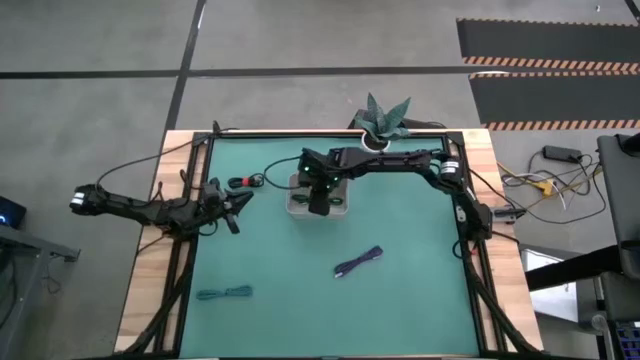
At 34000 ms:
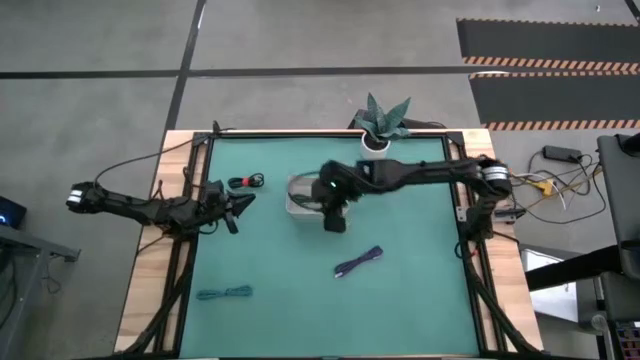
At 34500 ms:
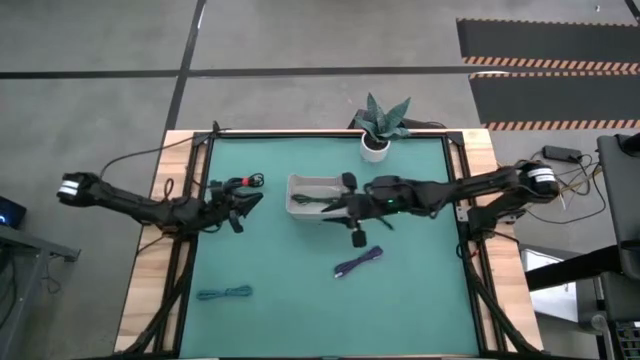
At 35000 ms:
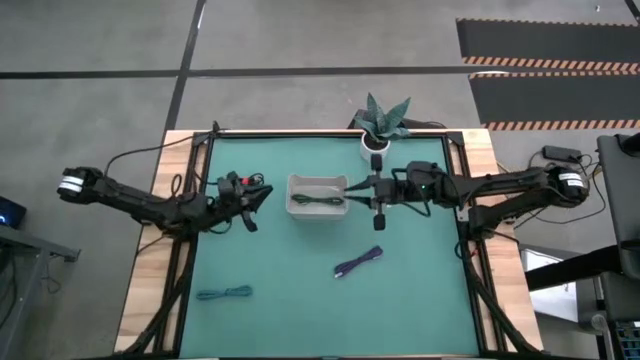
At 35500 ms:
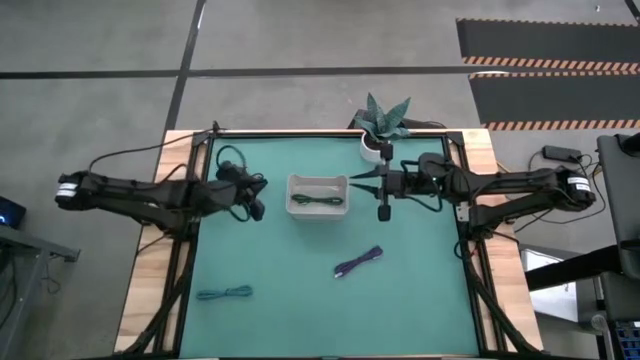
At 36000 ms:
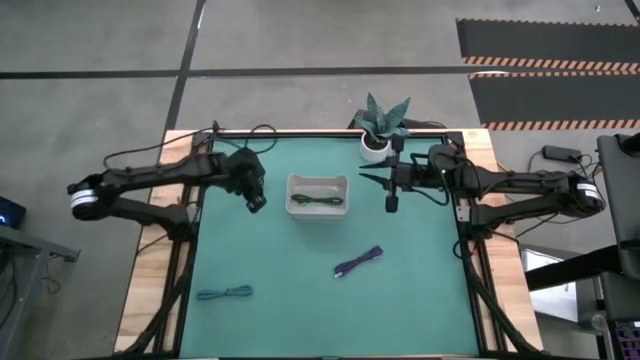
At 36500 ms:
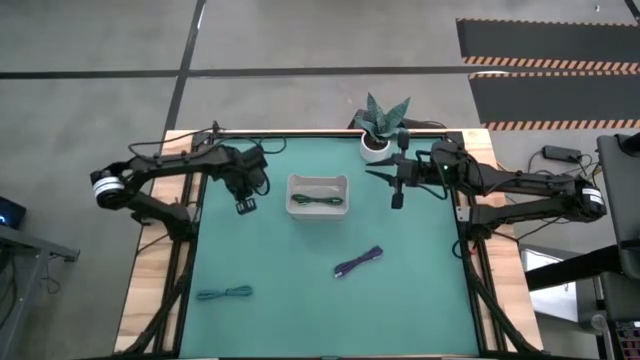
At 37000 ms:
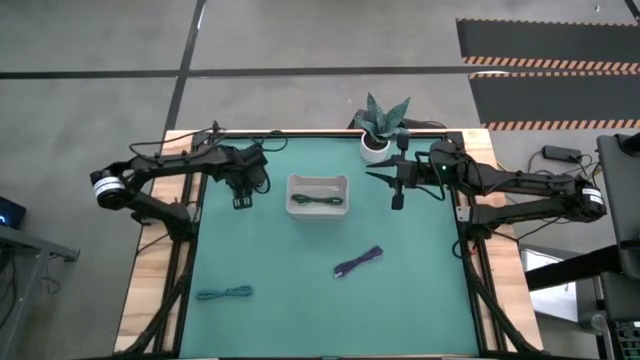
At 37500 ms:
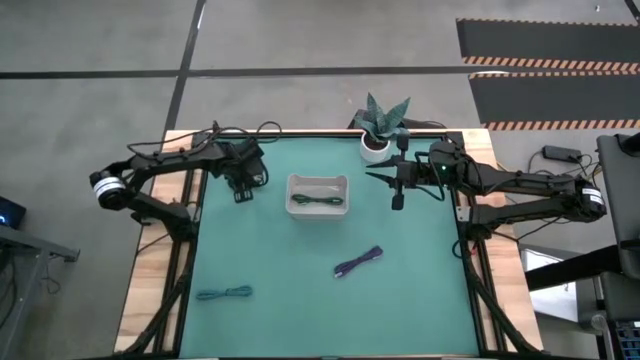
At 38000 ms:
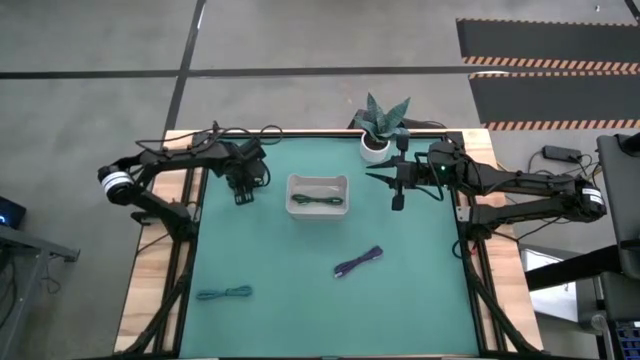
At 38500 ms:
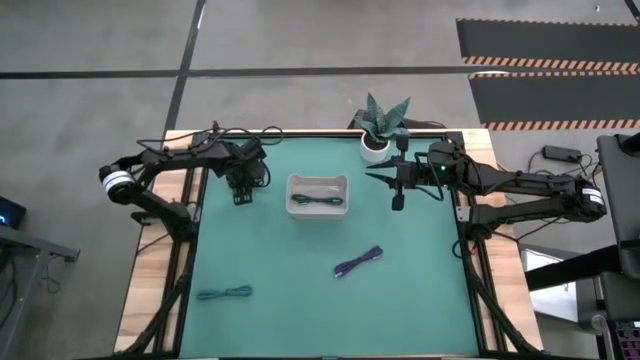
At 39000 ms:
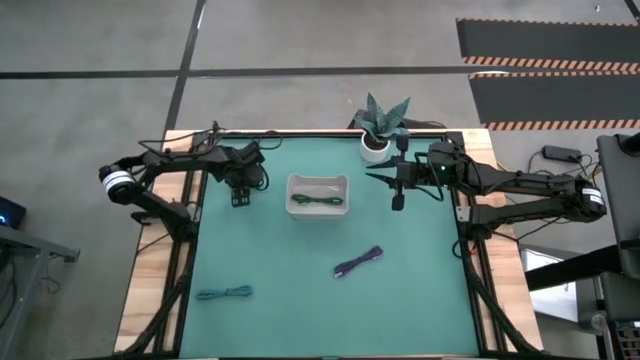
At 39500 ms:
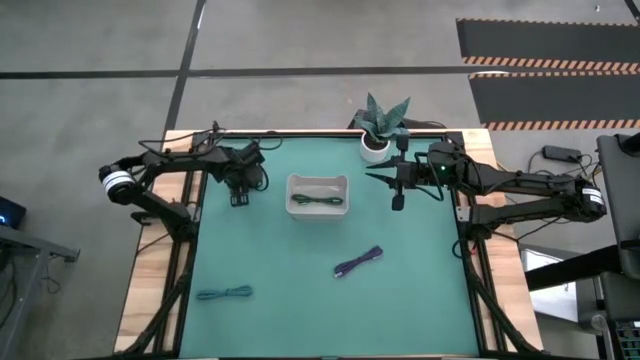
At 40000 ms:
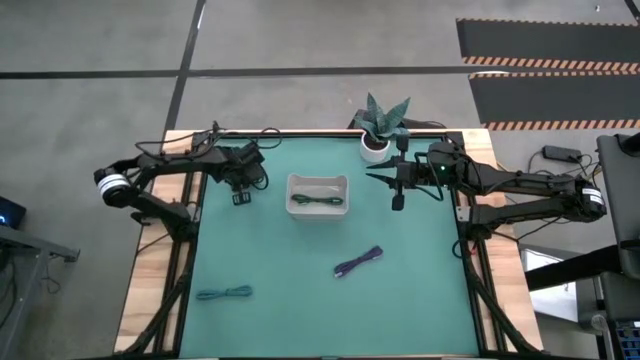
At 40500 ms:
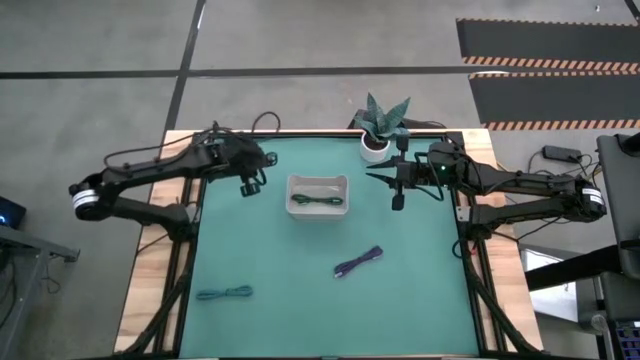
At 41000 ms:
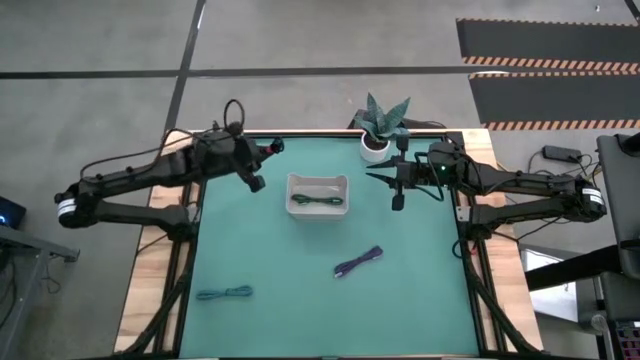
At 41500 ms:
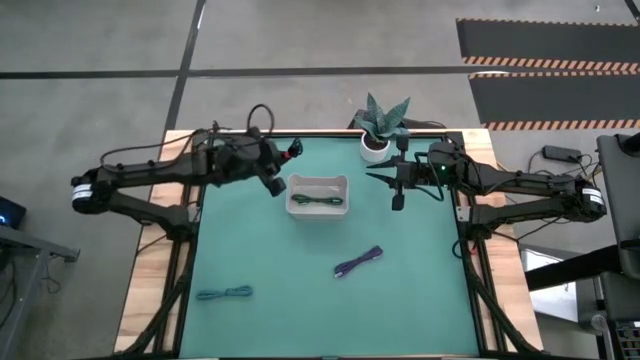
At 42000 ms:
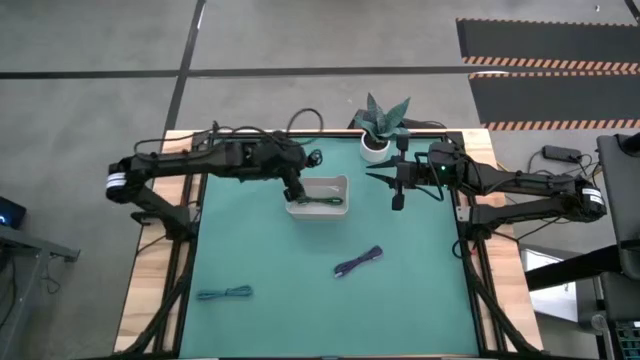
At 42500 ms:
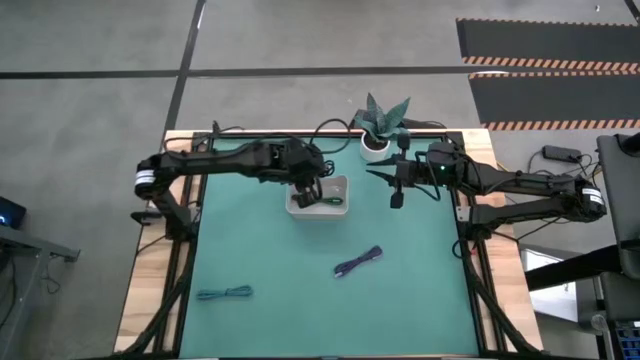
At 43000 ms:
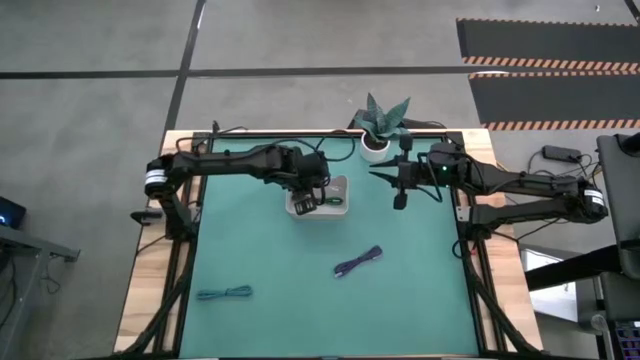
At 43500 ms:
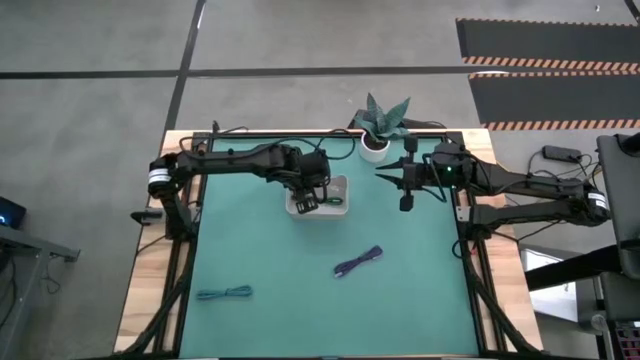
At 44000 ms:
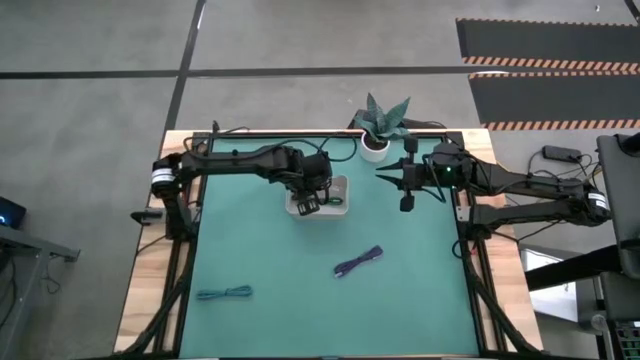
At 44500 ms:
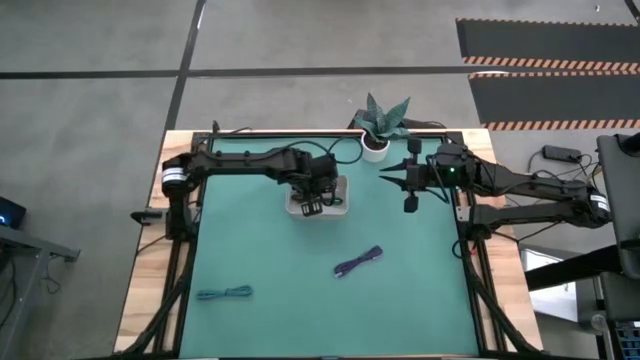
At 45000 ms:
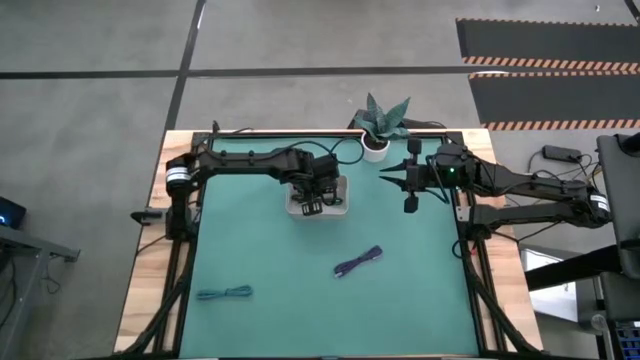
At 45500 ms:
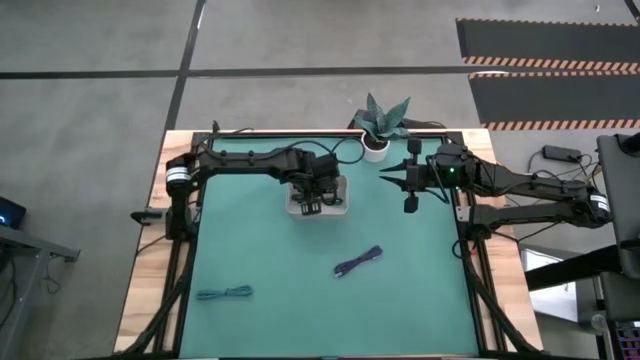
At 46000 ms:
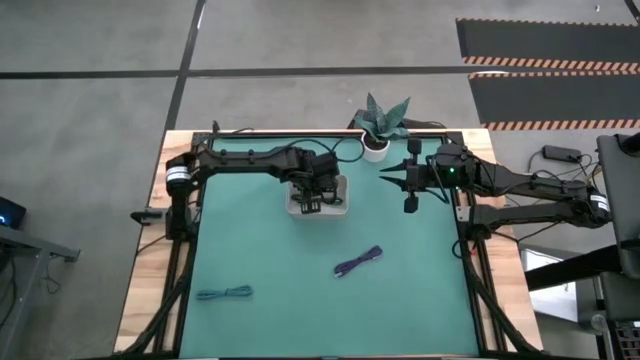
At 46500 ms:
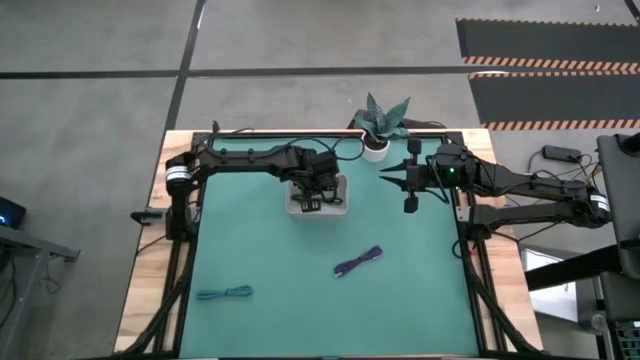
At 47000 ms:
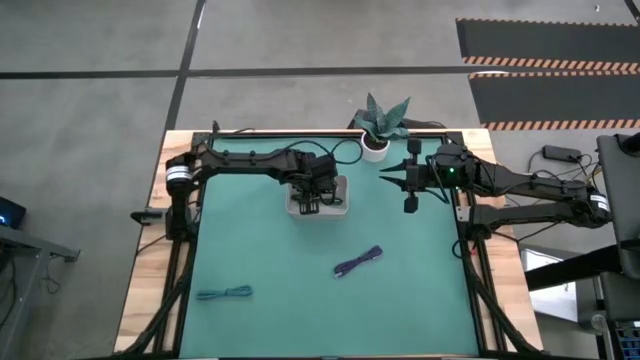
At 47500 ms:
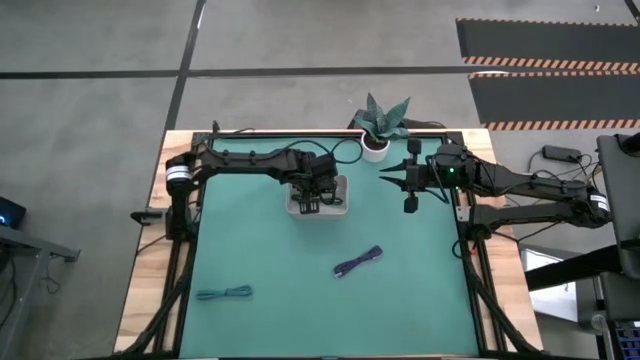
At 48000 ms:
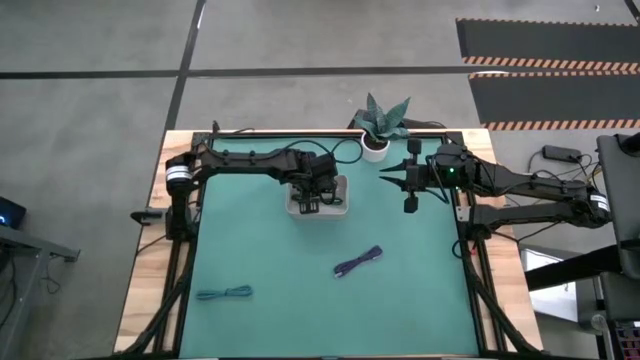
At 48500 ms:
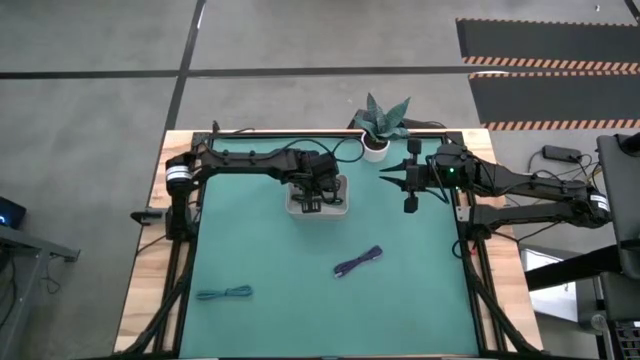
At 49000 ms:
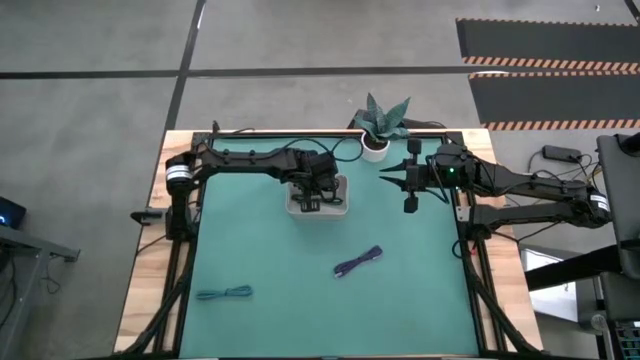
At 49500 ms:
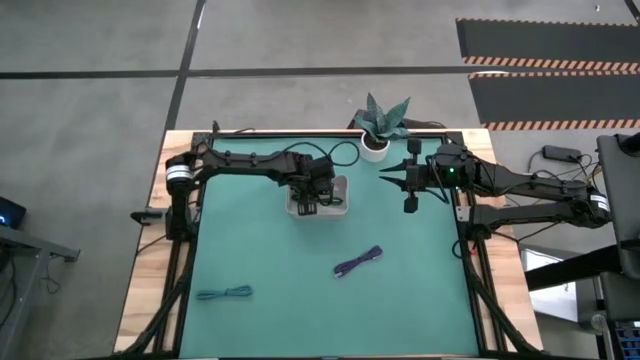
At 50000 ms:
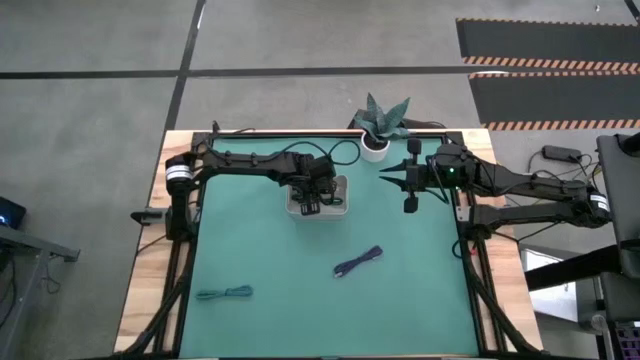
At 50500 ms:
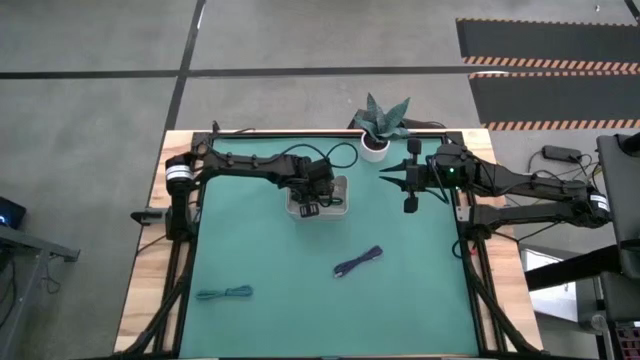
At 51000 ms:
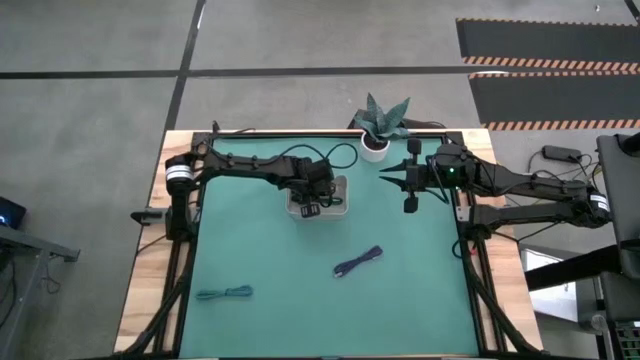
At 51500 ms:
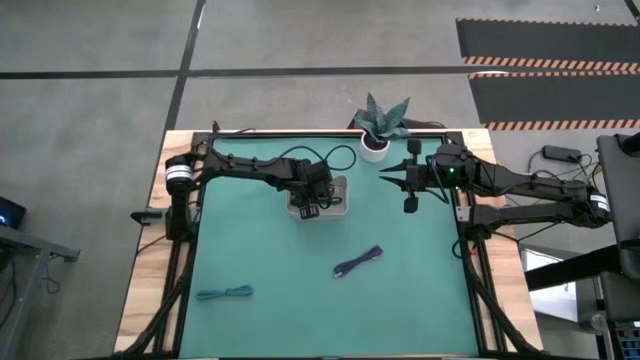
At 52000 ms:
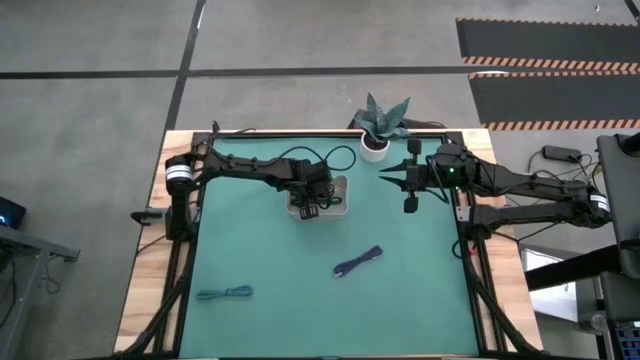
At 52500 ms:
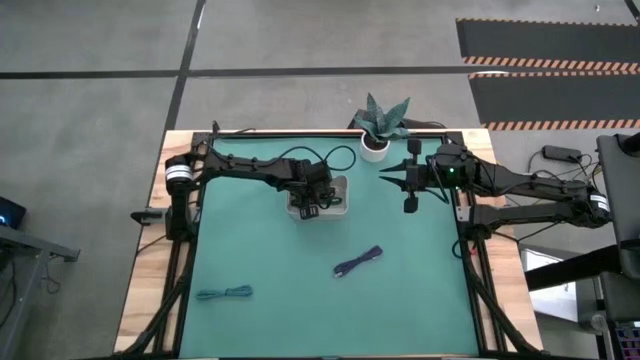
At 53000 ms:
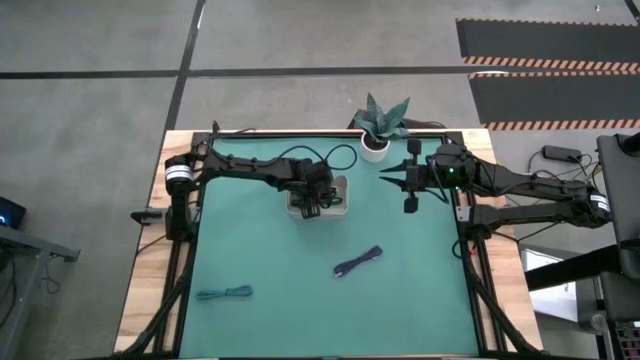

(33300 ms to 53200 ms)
Task: Pick and place USB-C Cables
Put the black charger cable into the white bin

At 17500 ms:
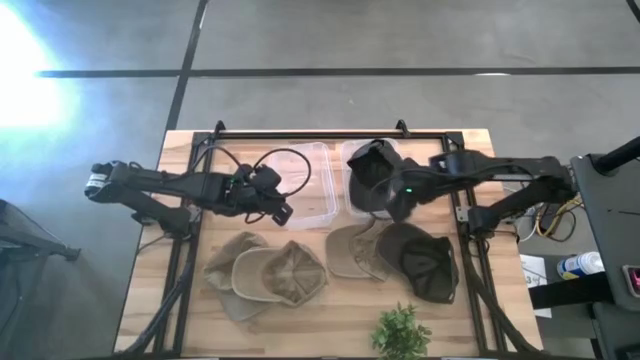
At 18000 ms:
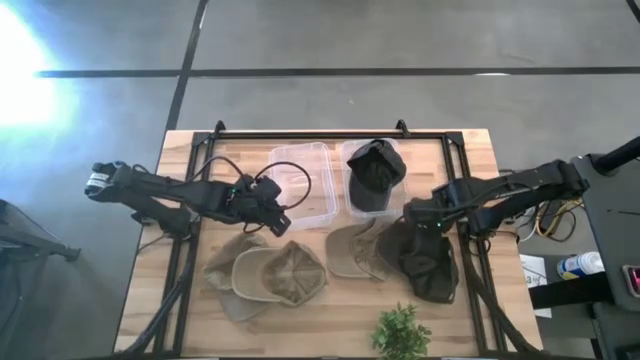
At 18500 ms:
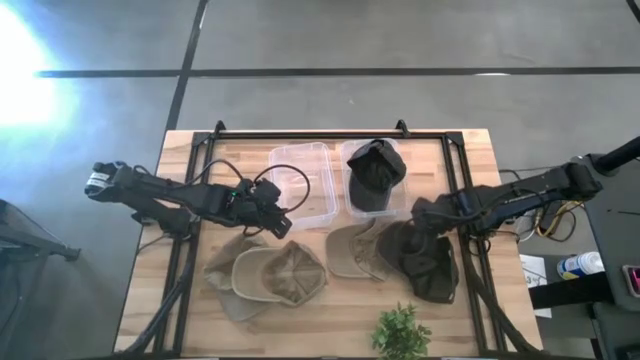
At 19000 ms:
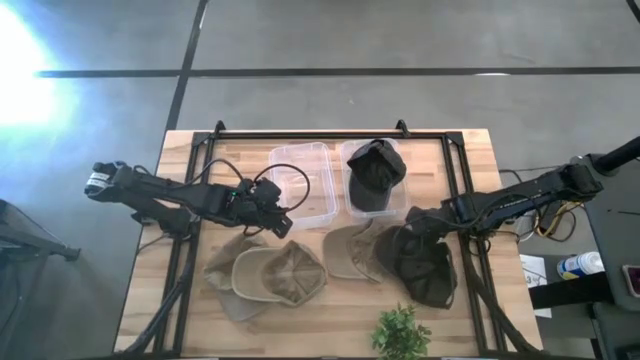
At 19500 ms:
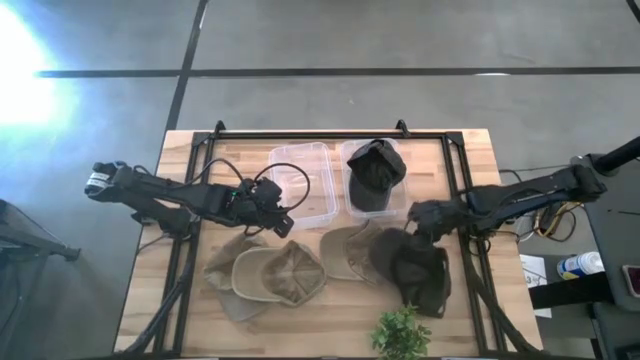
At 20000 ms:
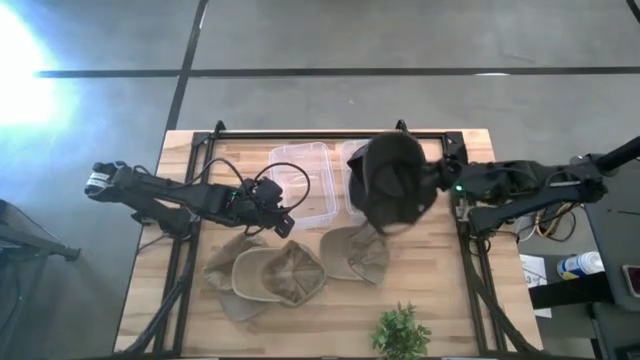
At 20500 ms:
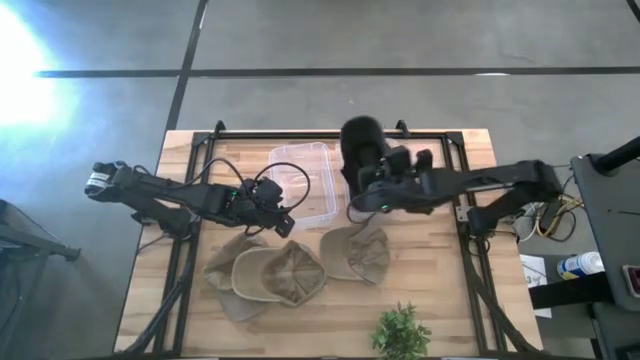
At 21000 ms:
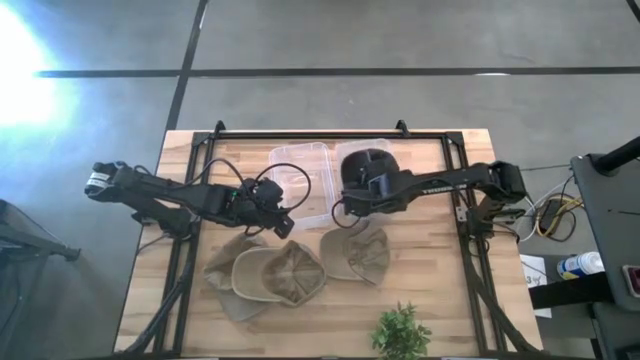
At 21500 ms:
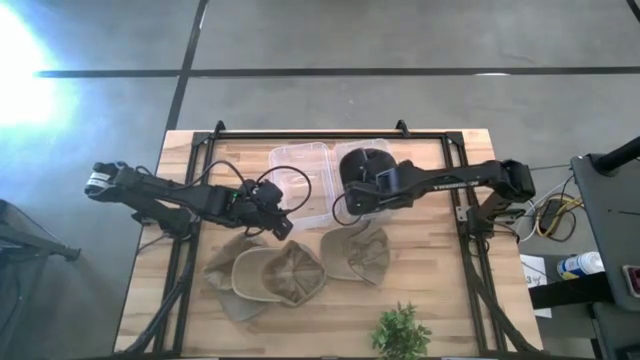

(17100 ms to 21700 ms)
Task: Pick & Place hat
Put the black cap into the right transparent bin
